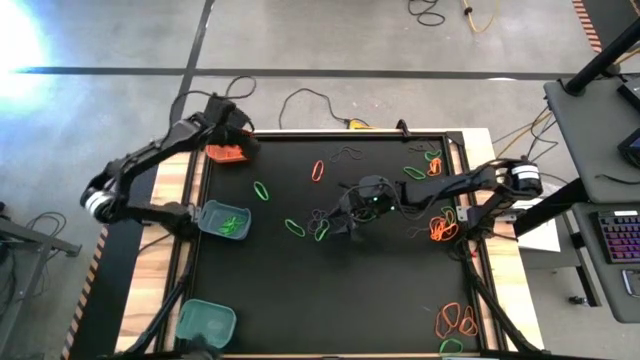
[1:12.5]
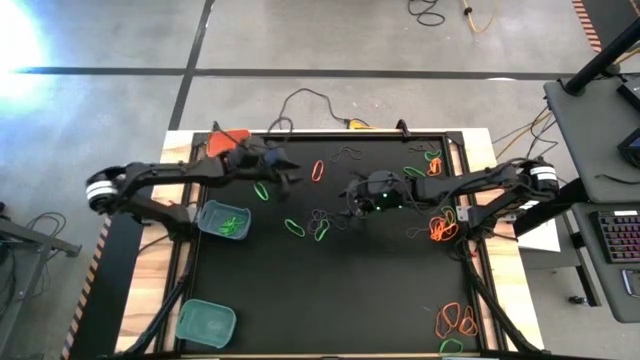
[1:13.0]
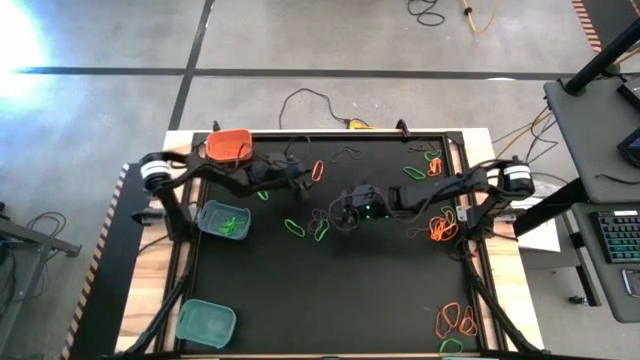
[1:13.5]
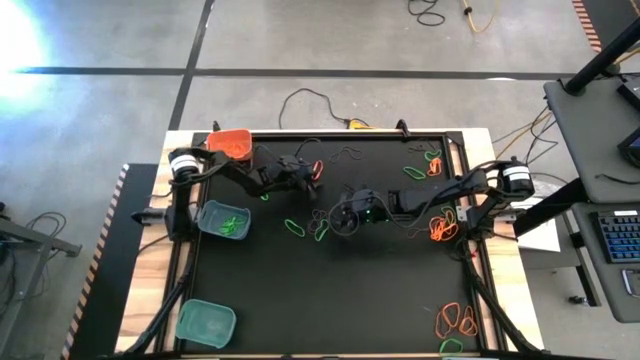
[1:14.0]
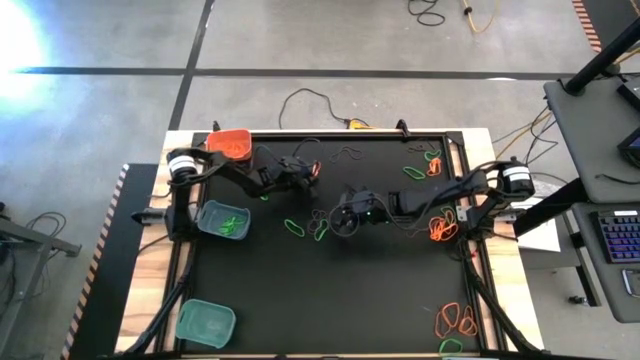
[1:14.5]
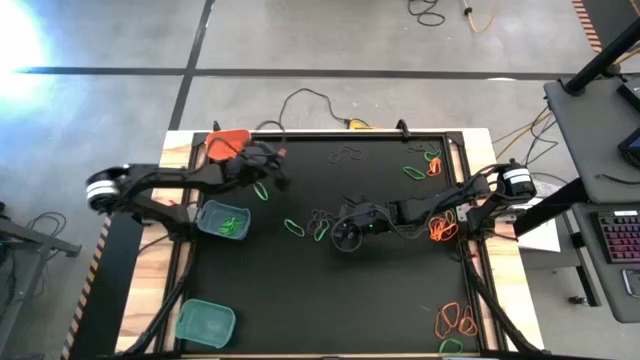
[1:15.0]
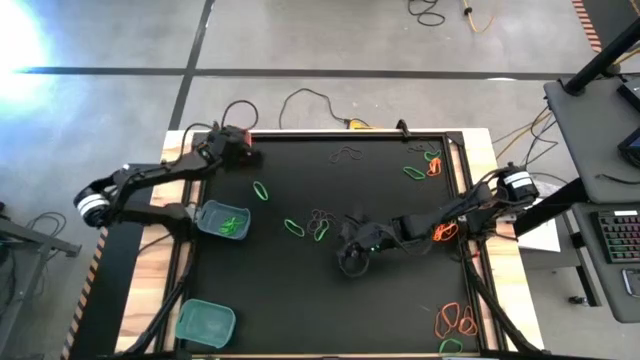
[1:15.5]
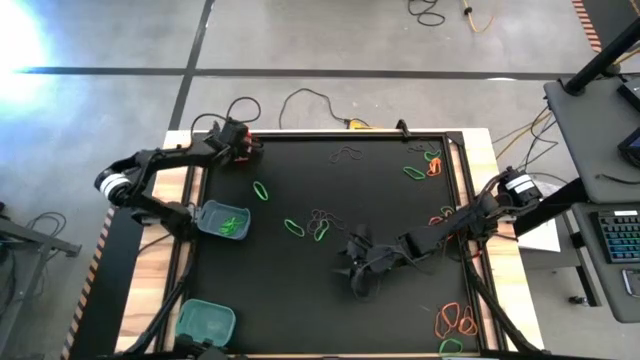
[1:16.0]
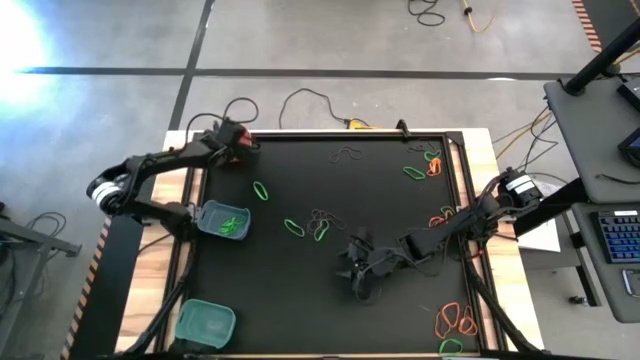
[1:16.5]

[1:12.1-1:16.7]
Task: Sort rubber bands into baskets
Put the orange rubber band into the orange bin

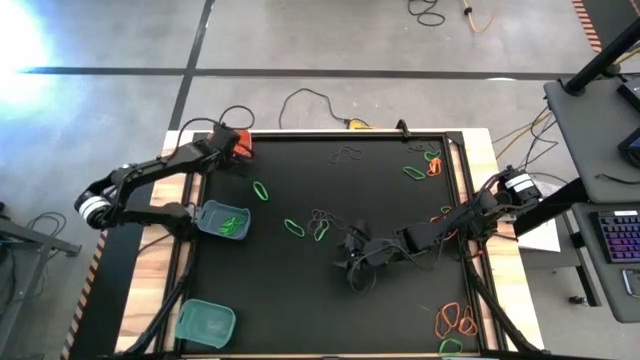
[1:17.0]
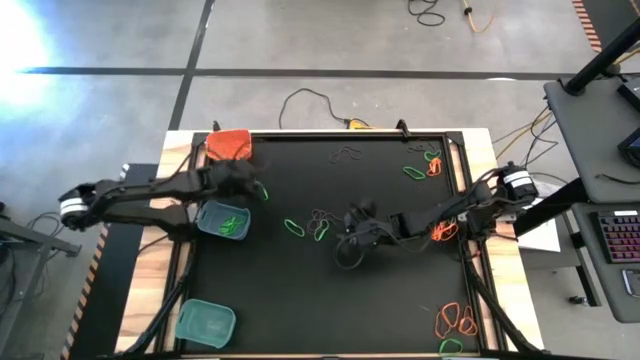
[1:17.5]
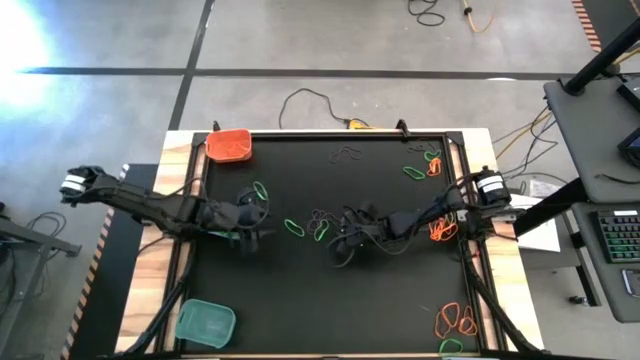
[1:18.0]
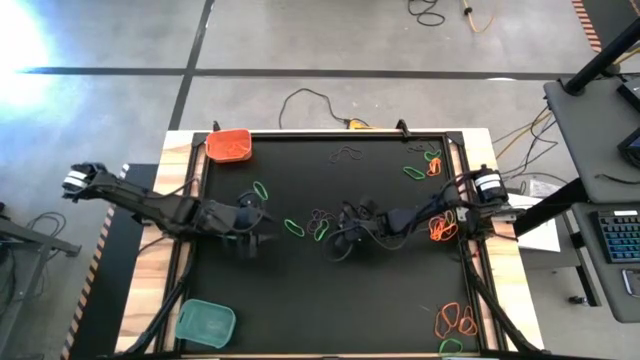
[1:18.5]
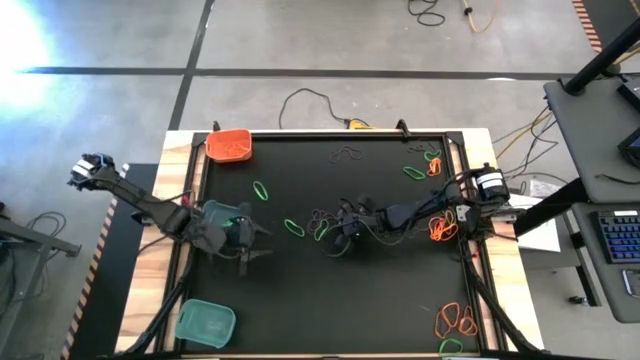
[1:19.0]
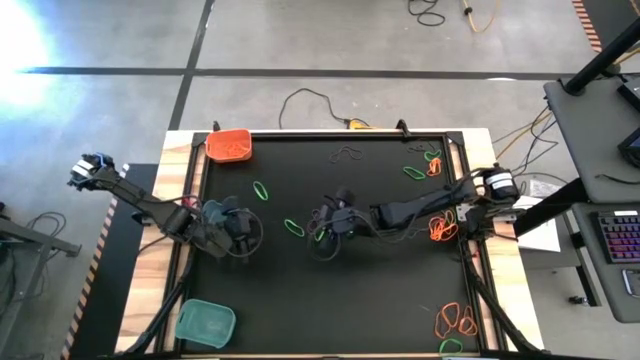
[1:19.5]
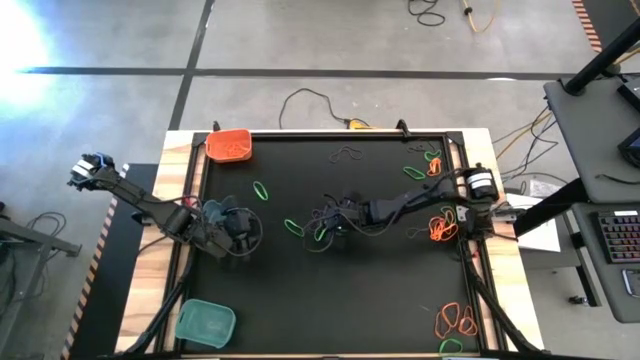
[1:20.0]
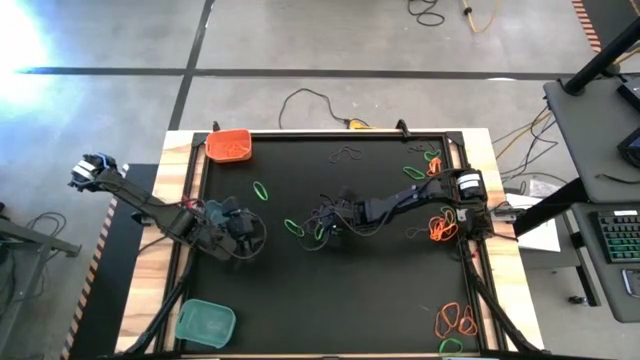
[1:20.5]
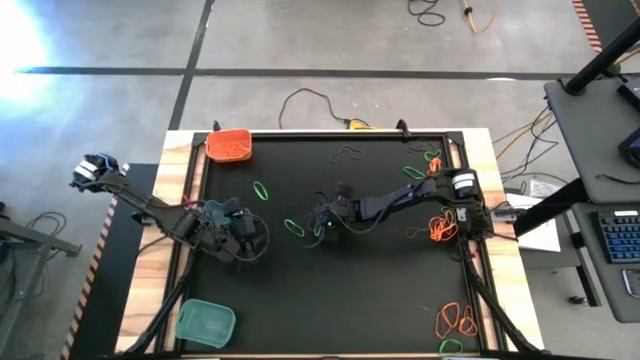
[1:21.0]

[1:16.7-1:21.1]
Put the purple rubber band into the green bin

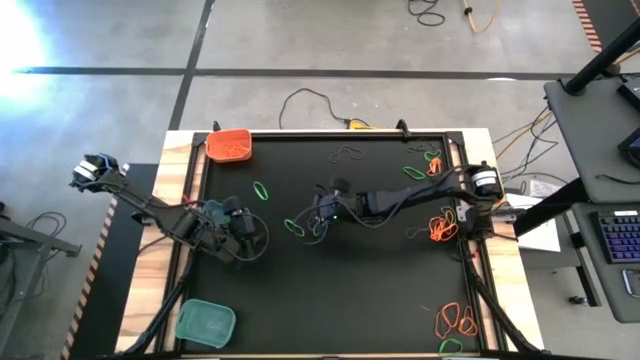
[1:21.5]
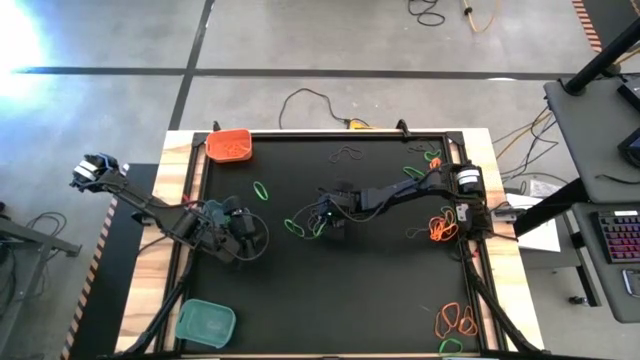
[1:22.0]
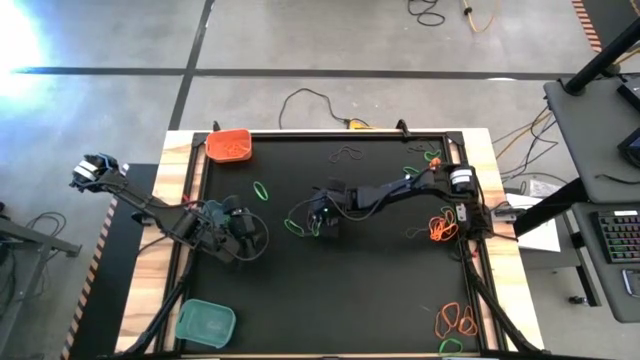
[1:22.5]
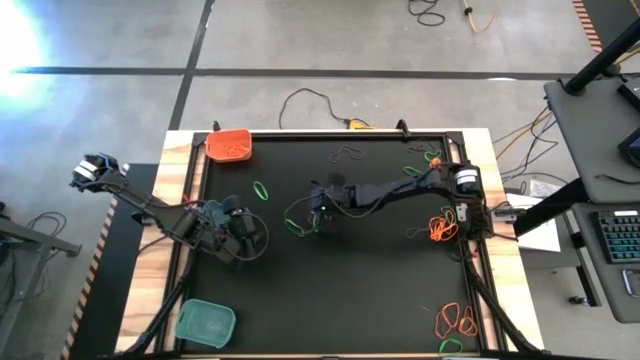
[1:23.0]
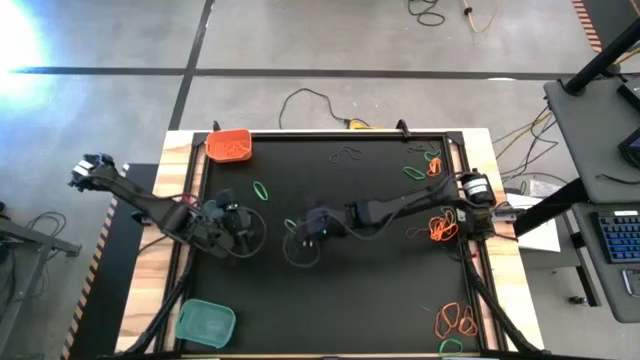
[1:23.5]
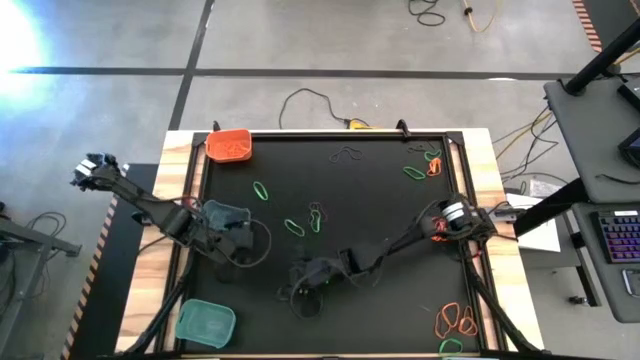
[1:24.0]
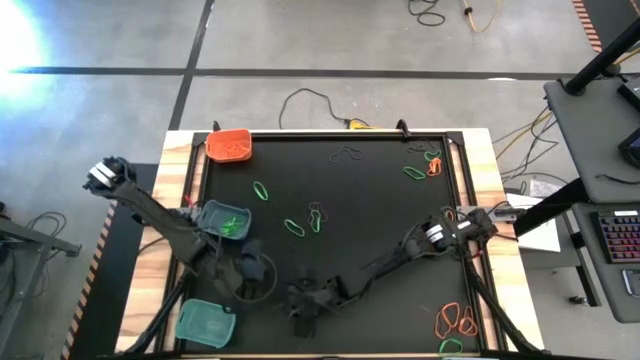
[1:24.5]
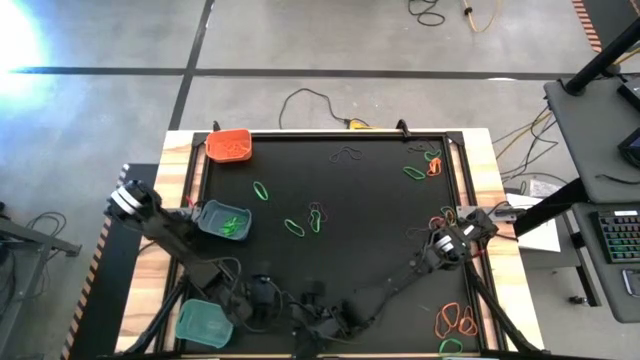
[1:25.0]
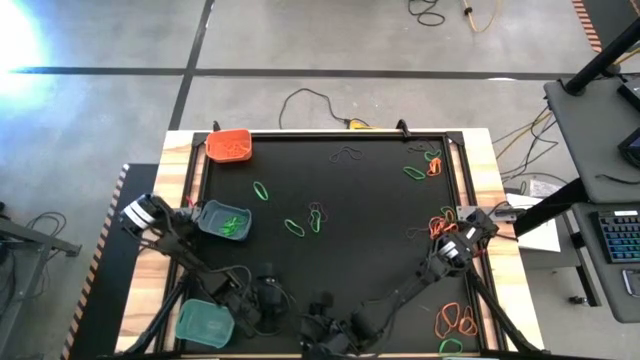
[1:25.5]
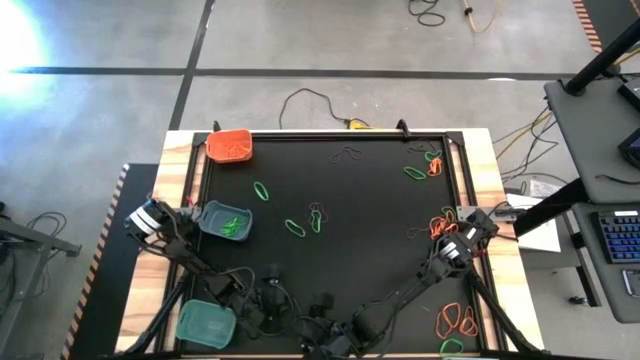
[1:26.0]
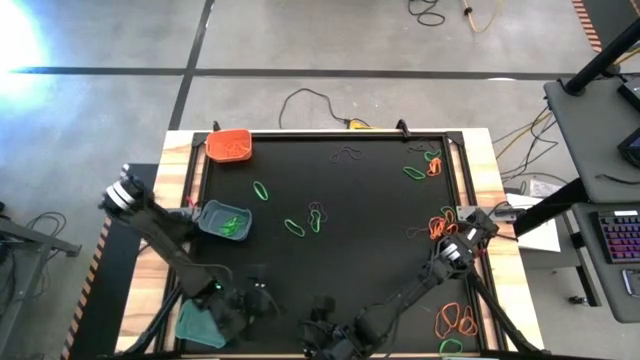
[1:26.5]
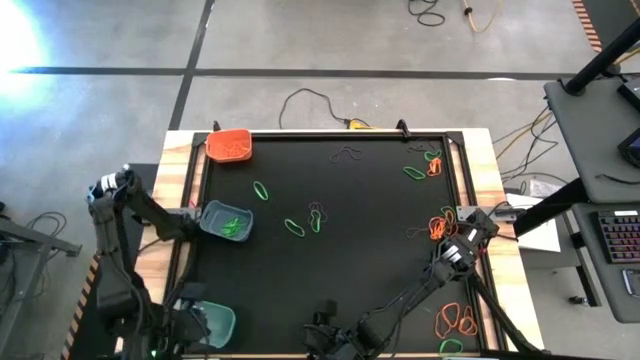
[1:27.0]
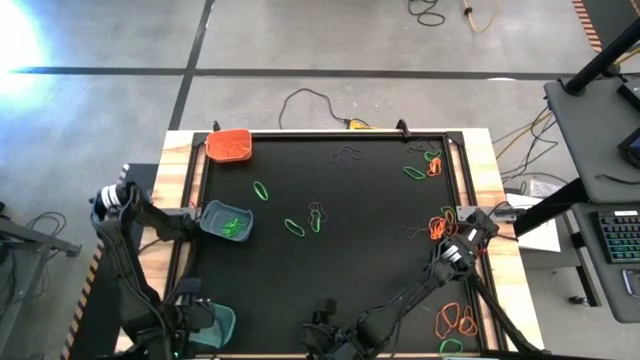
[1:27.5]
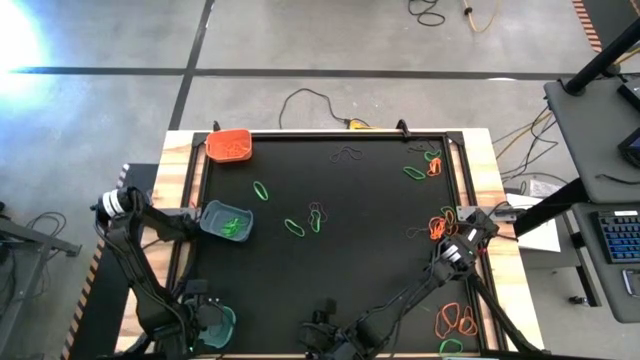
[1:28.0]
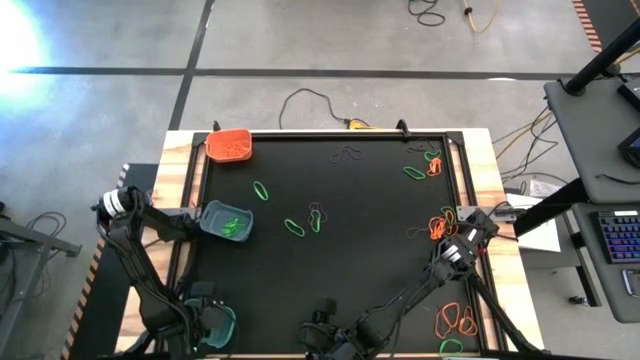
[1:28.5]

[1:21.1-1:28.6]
Put the purple rubber band into the green bin

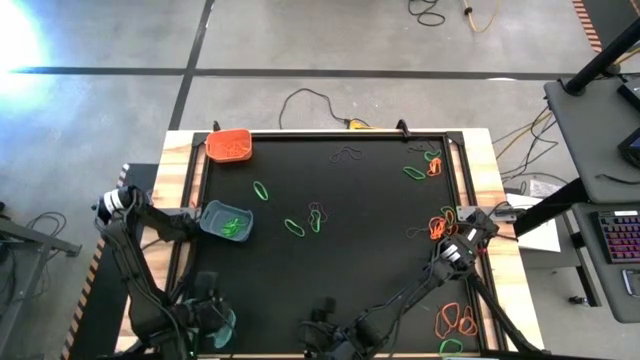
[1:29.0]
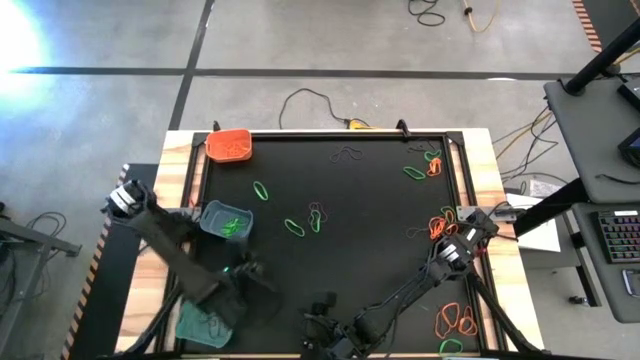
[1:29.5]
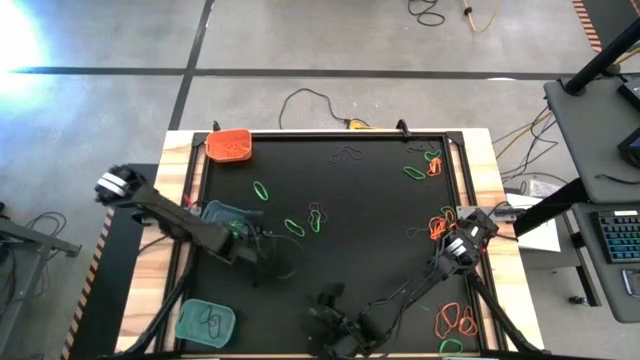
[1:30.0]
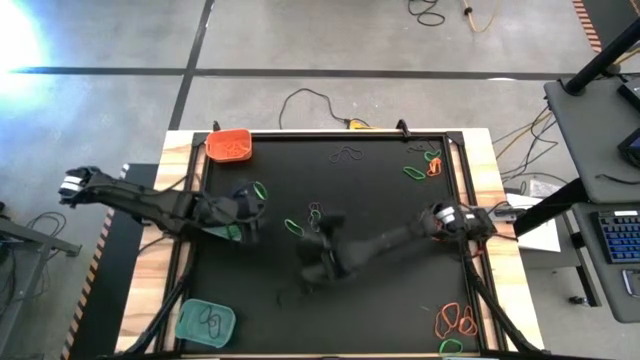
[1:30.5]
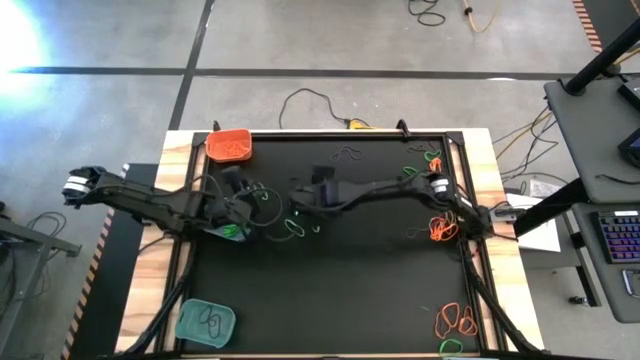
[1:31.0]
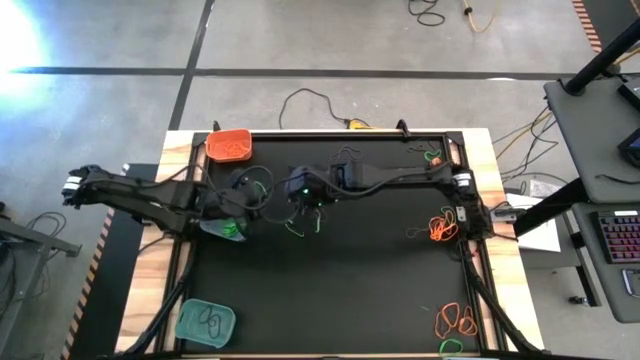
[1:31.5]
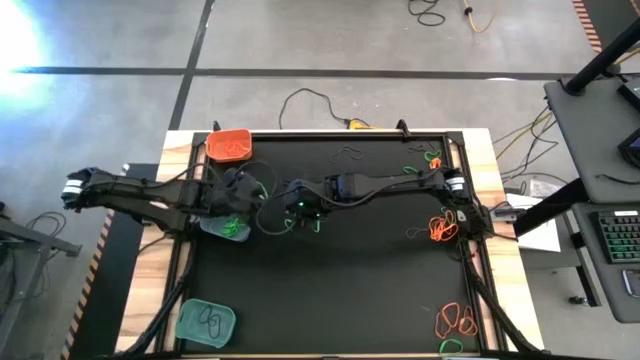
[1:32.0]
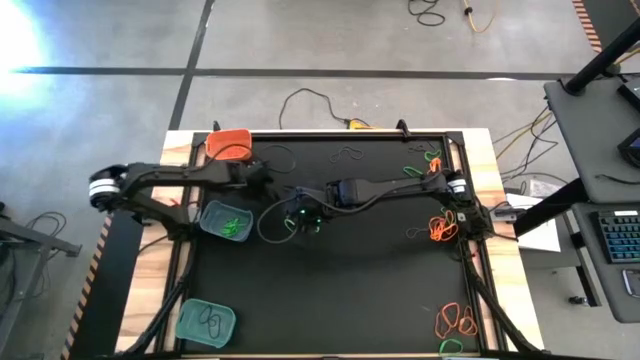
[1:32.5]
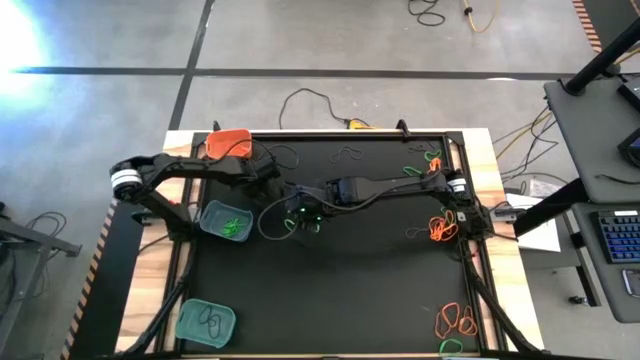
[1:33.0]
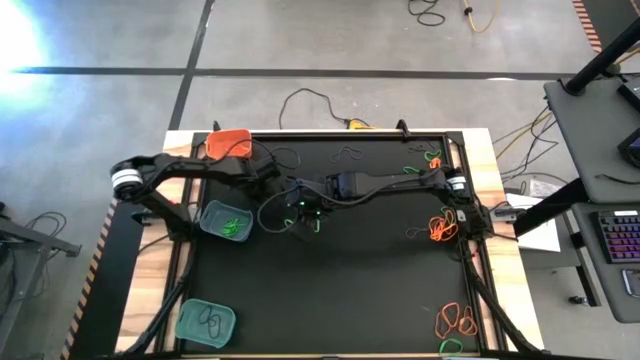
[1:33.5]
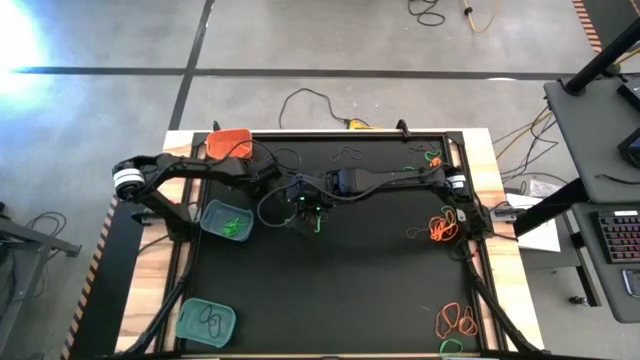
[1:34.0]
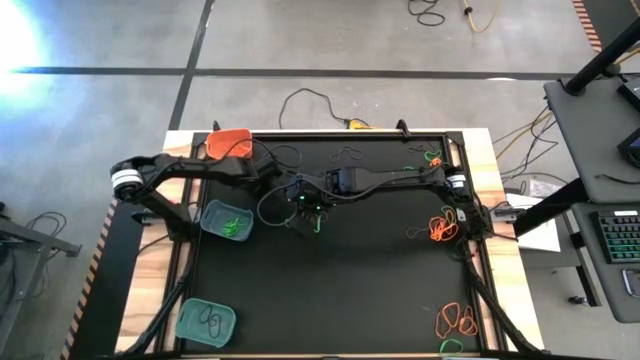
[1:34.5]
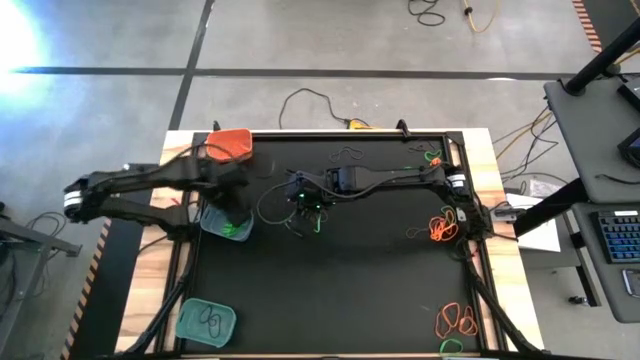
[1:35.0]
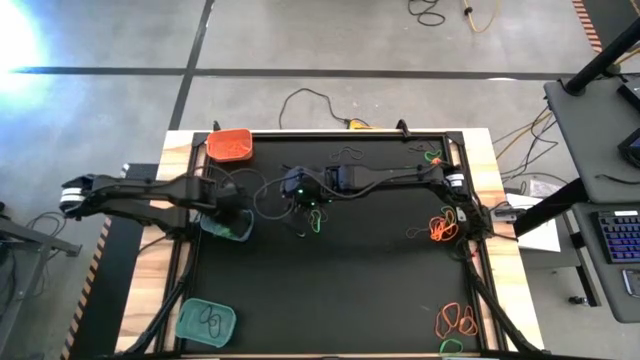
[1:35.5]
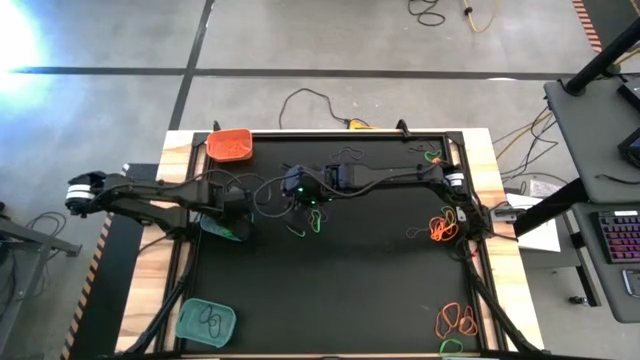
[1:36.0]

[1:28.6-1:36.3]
Put the green rubber band into the blue bin
